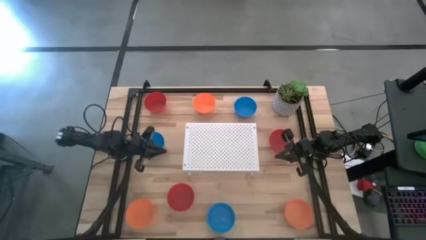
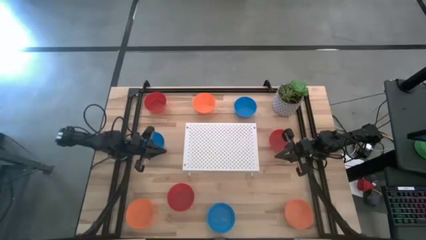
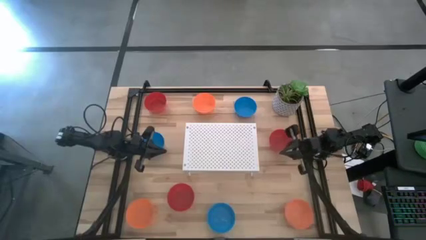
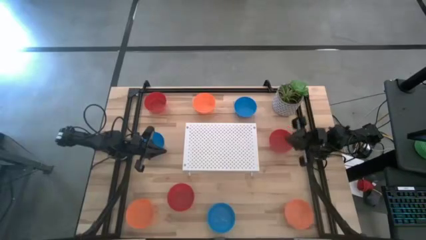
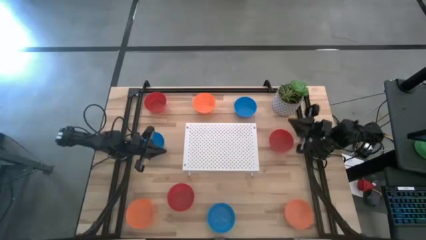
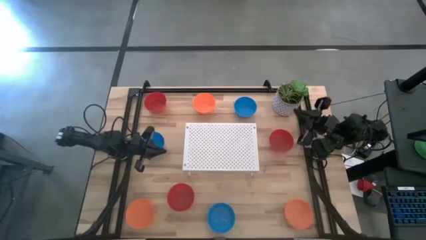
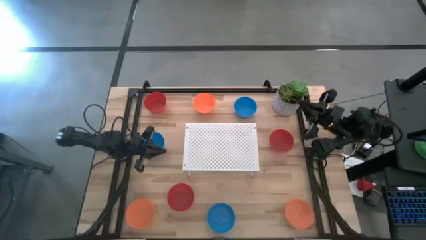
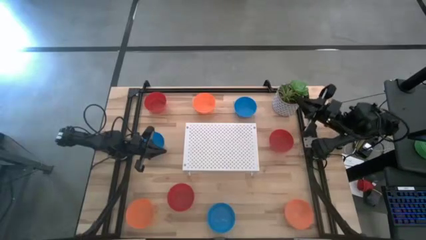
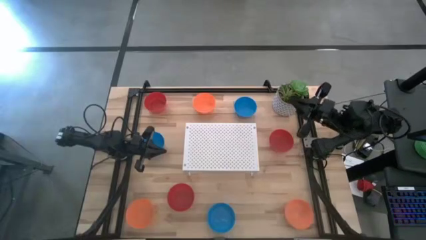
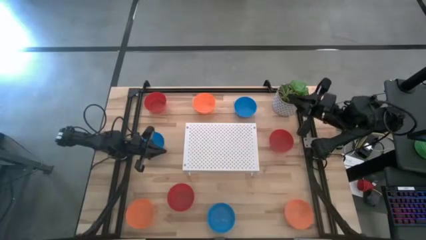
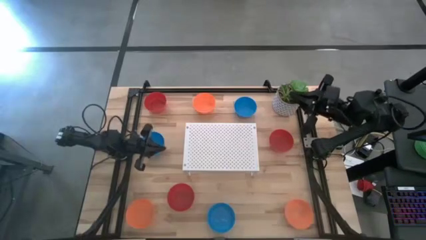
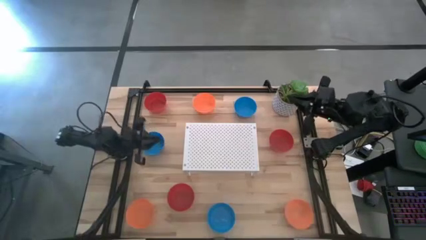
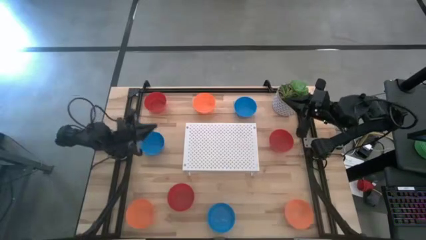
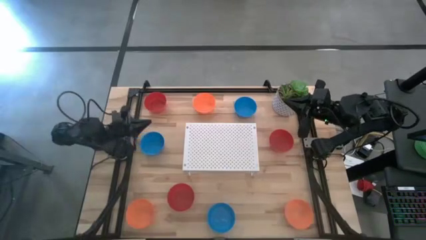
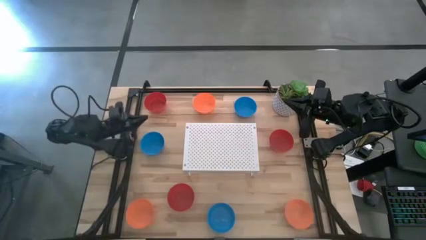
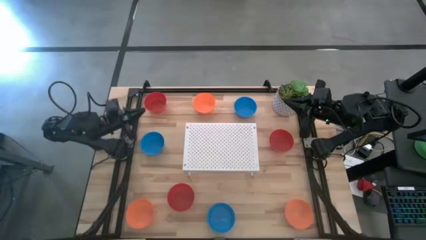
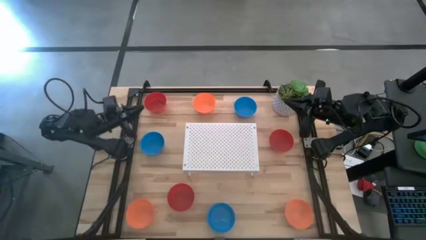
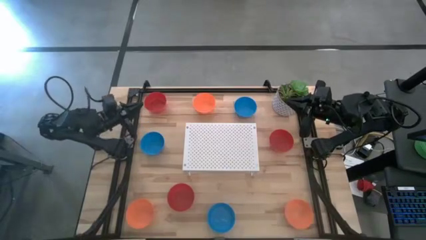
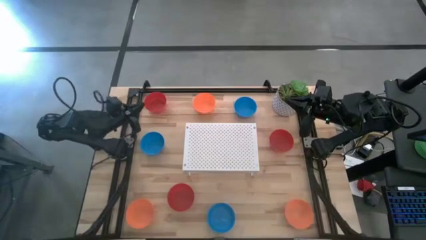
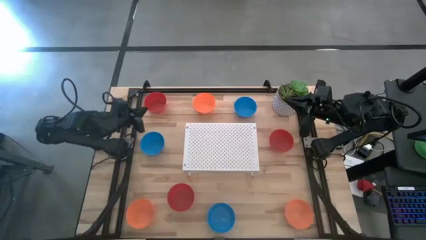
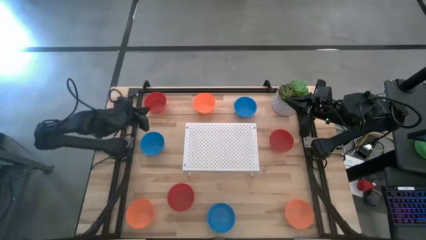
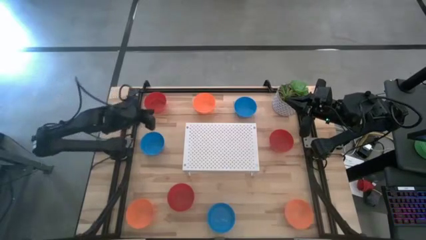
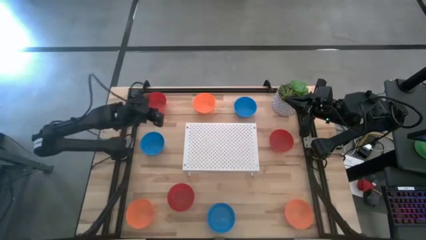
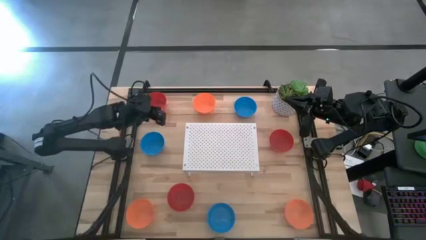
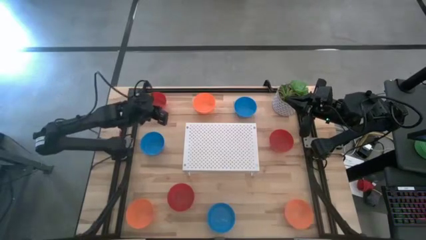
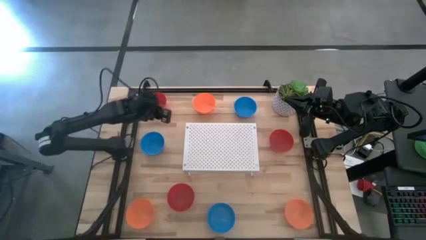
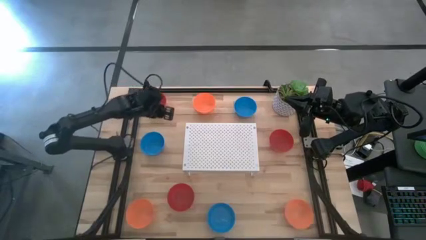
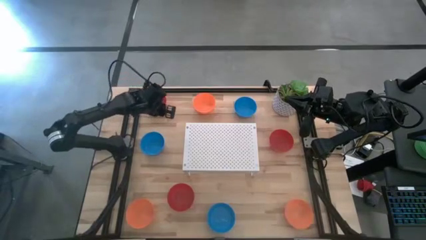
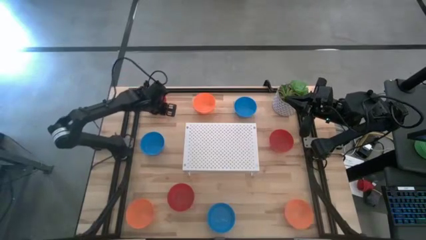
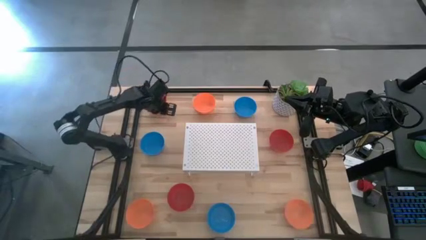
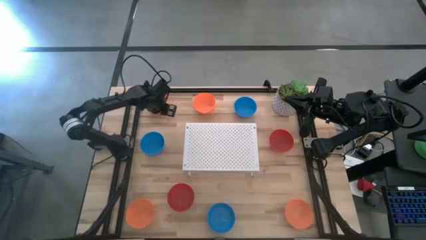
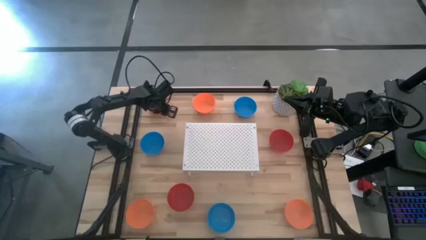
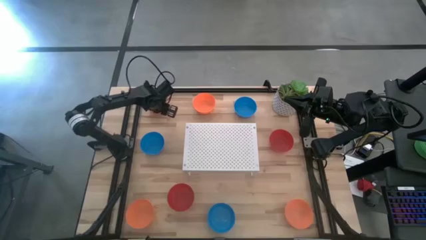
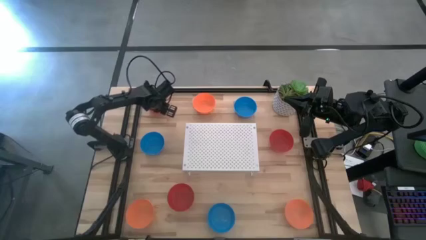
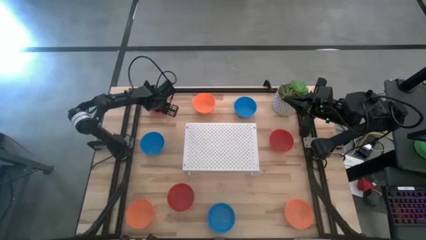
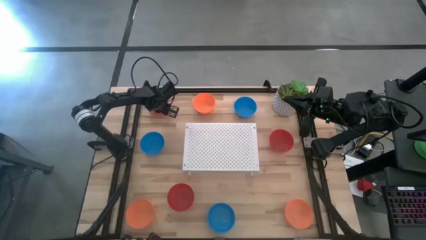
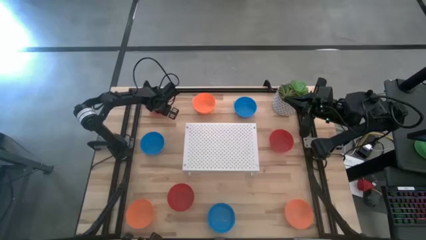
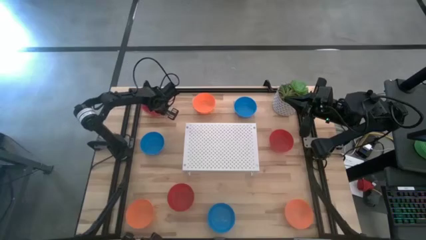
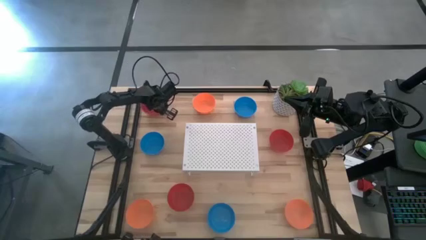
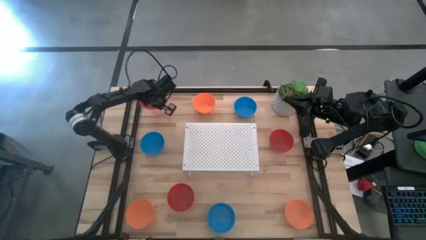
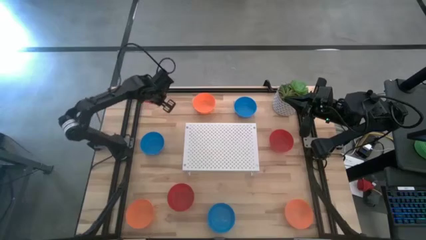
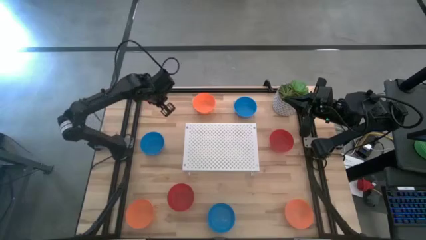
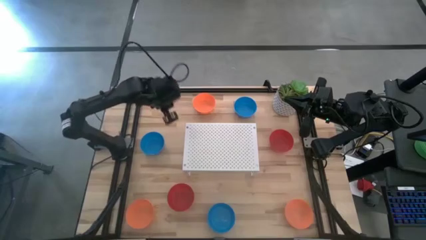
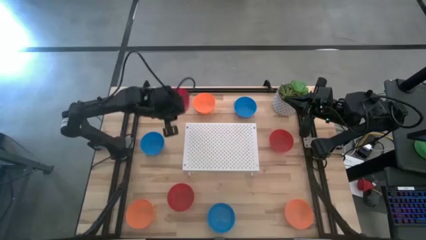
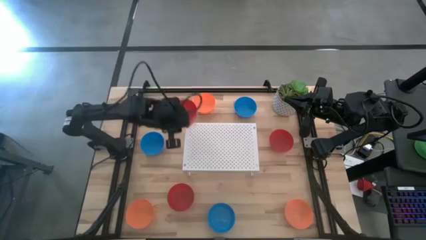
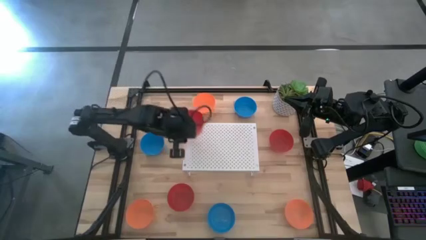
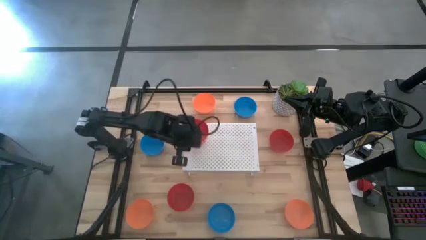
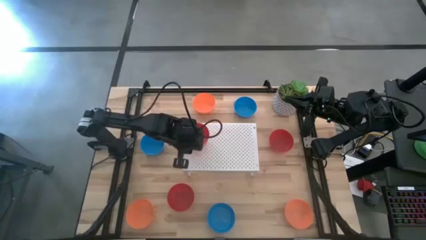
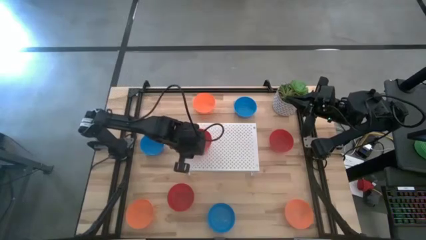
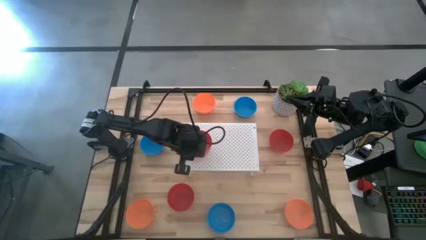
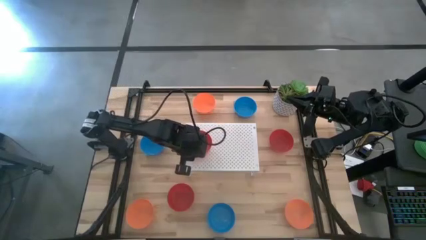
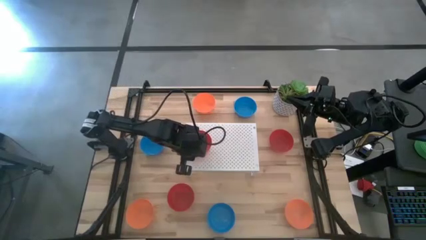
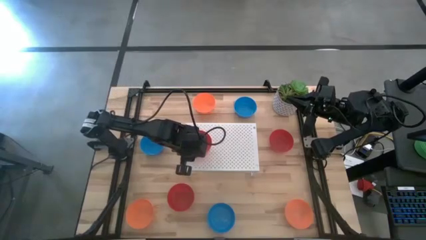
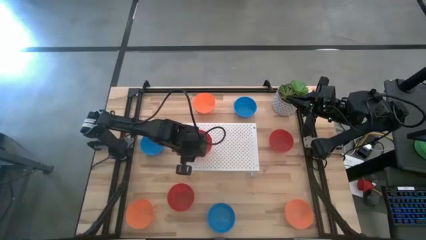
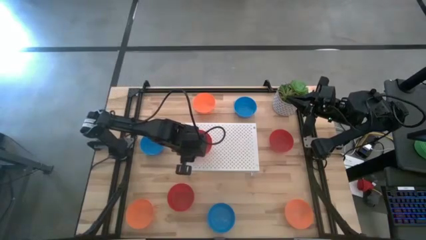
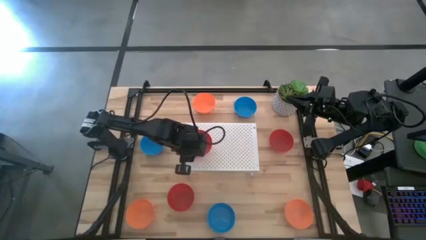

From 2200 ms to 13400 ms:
Task: Pick & Place Mini bowls
Put the top red bowl on the shelf
